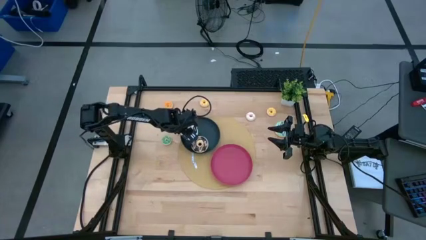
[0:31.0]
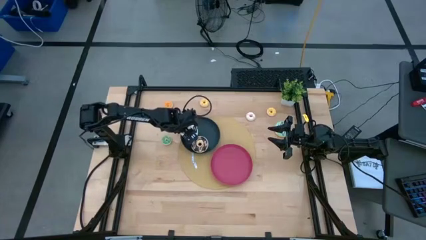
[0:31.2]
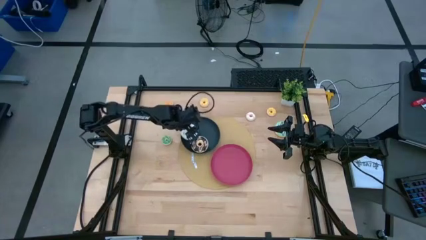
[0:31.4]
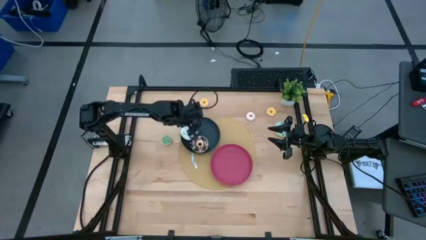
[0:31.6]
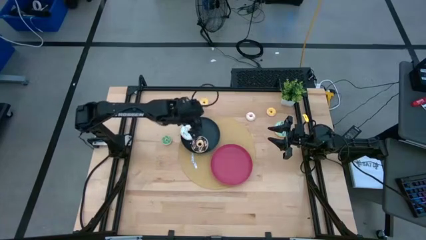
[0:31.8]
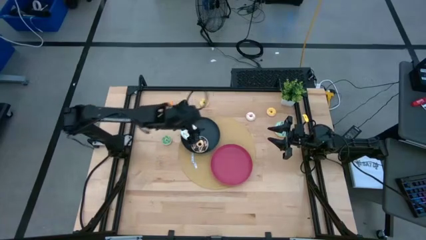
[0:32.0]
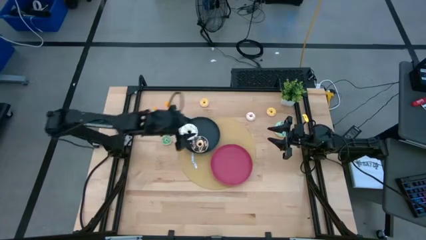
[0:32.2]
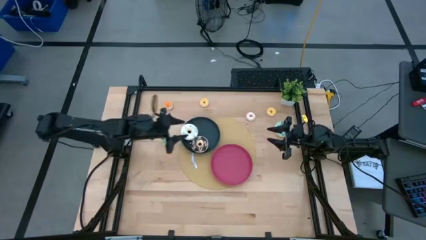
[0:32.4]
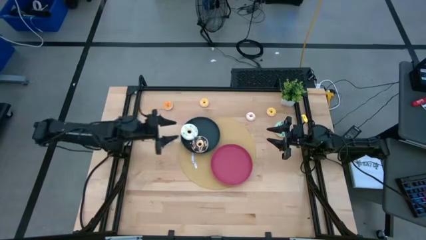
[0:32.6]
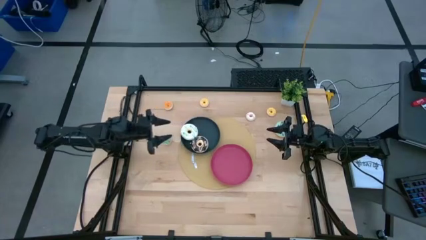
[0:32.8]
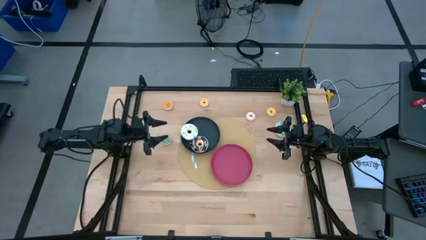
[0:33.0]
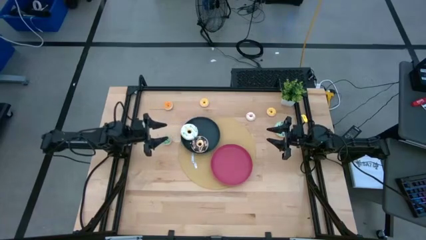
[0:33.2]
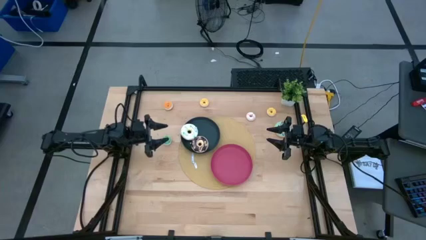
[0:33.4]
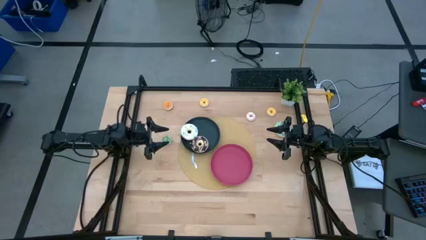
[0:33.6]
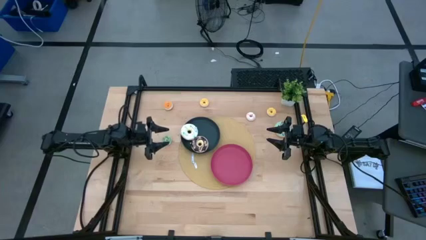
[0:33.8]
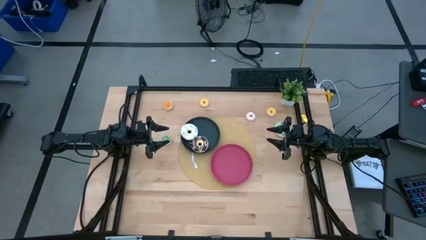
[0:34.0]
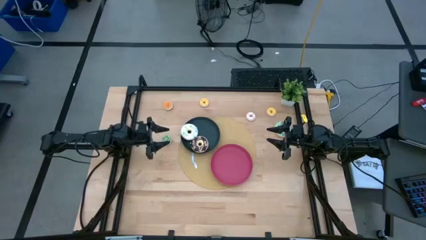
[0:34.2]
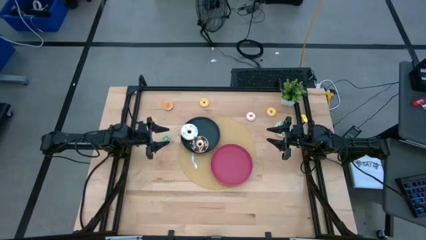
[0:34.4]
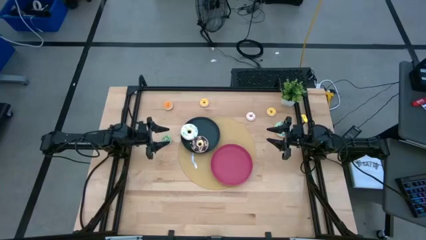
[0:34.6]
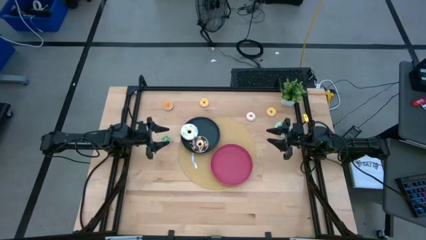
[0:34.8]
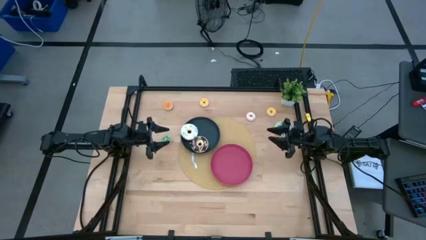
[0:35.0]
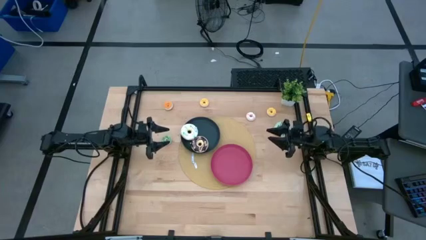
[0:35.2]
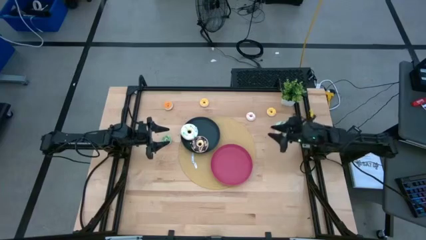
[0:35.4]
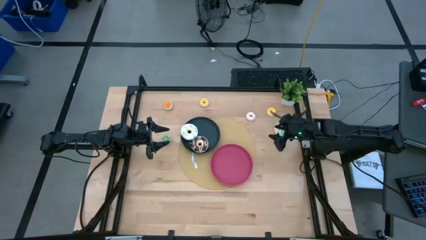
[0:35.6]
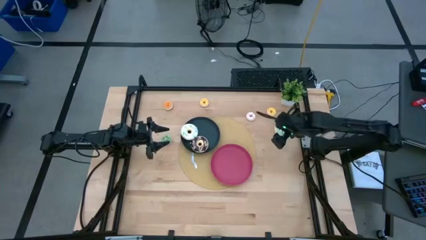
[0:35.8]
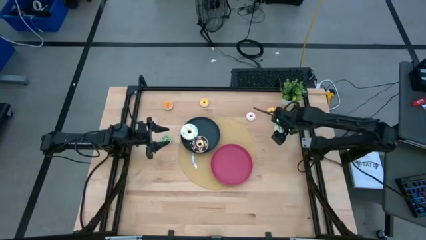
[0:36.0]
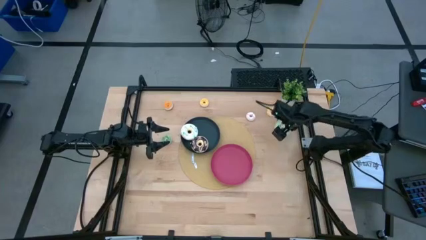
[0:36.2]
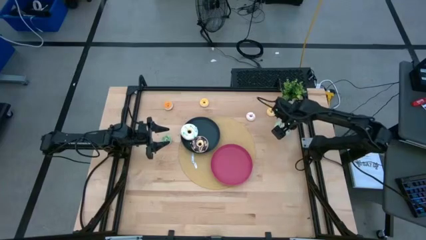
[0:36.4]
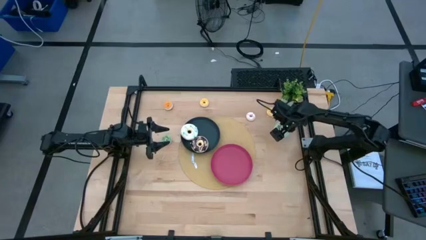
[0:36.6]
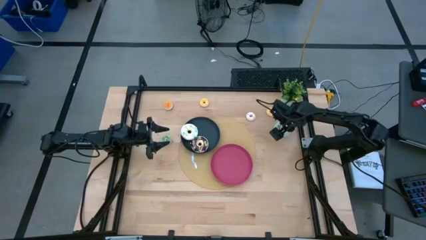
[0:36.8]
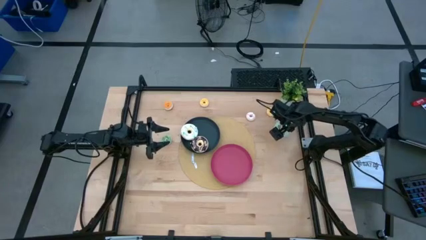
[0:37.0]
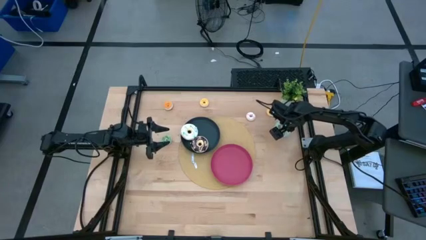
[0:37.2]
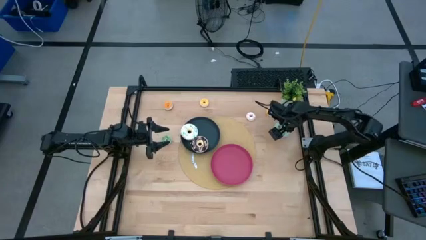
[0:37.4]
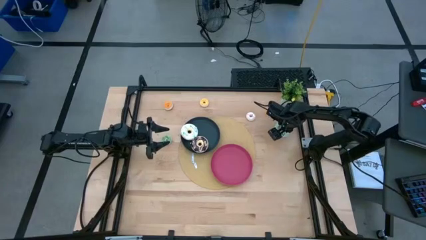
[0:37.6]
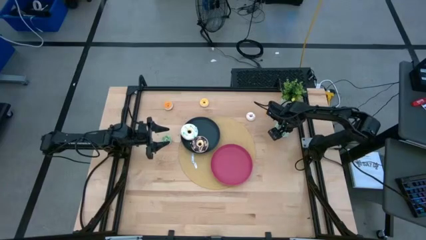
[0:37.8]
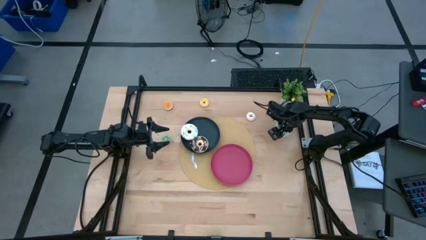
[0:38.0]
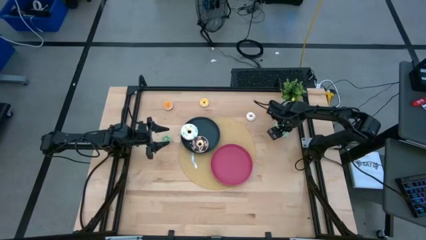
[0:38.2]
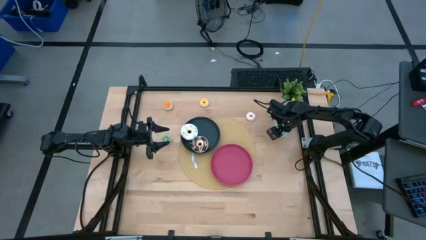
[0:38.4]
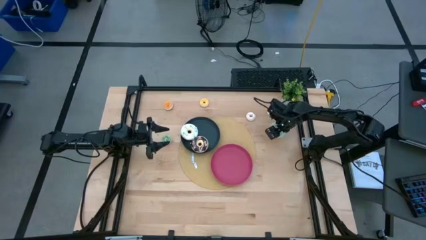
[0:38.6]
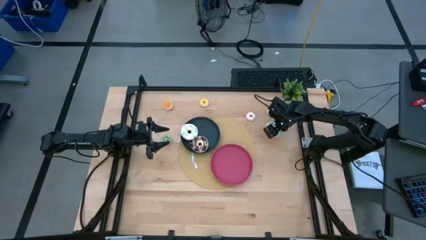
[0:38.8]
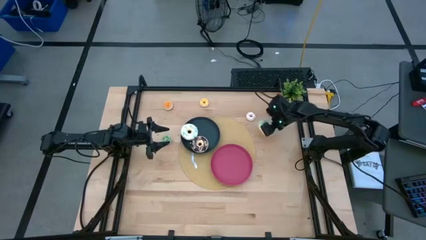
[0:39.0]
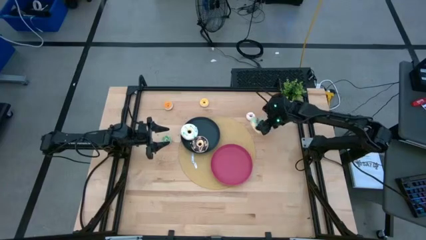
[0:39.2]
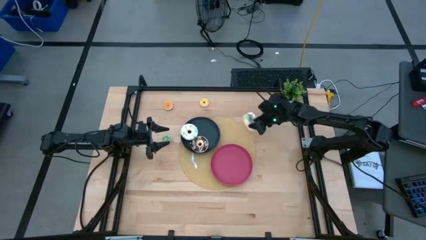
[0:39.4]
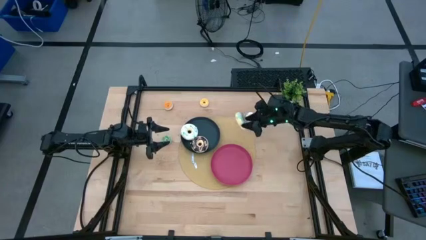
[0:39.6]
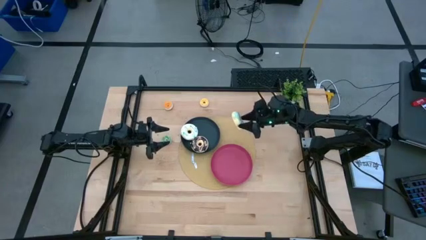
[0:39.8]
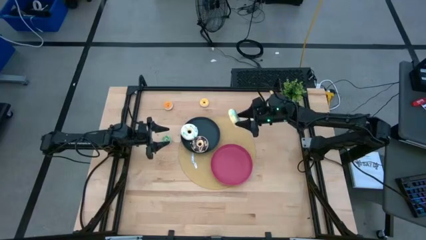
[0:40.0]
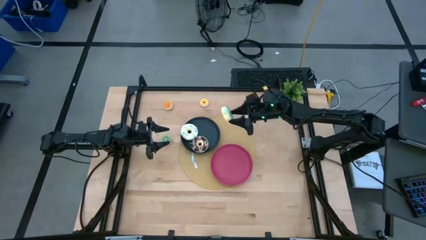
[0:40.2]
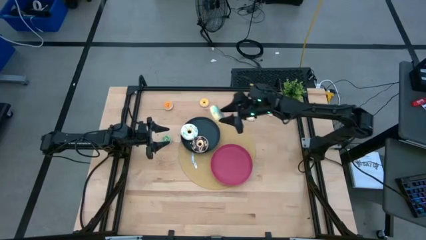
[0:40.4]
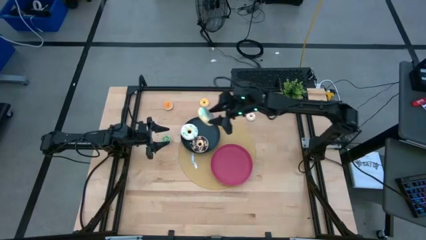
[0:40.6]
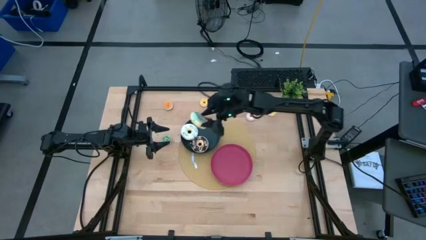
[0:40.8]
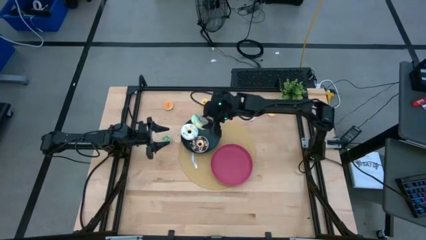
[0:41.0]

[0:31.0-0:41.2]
Task: Pick & Place donuts
Put the large blue donut on the black plate
